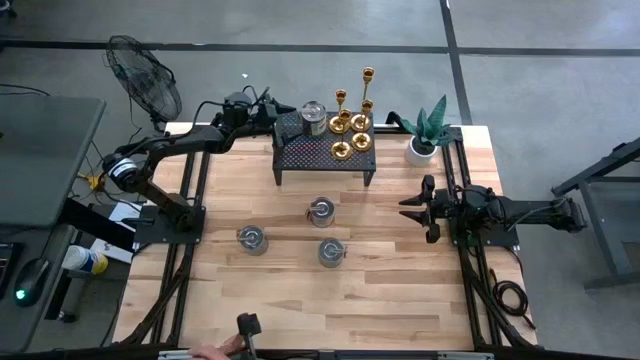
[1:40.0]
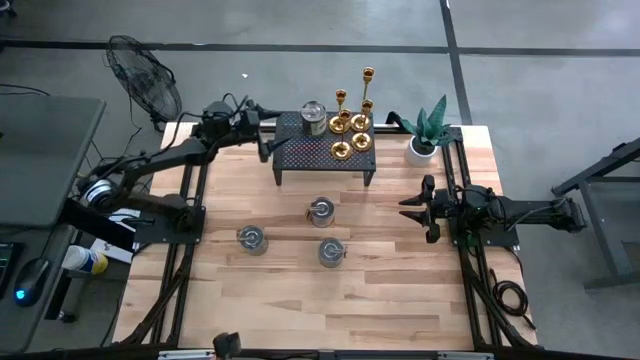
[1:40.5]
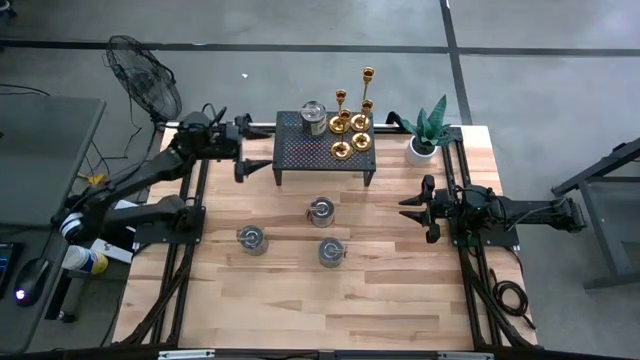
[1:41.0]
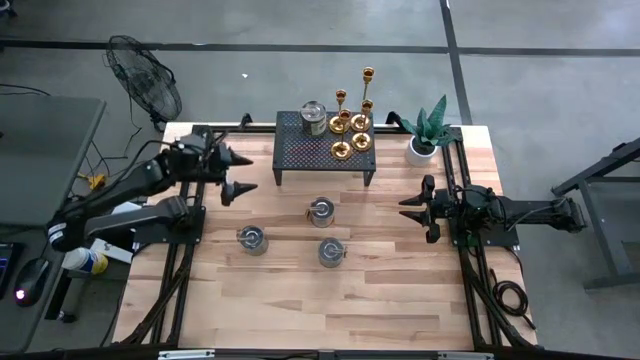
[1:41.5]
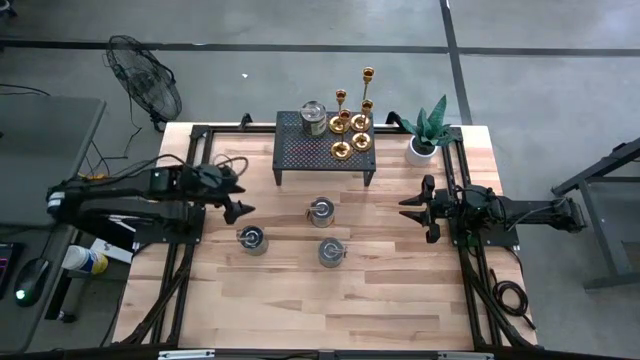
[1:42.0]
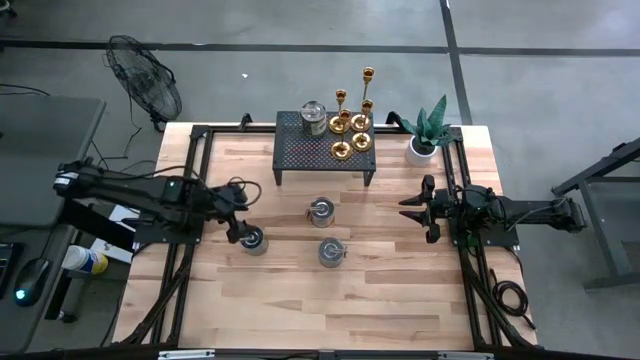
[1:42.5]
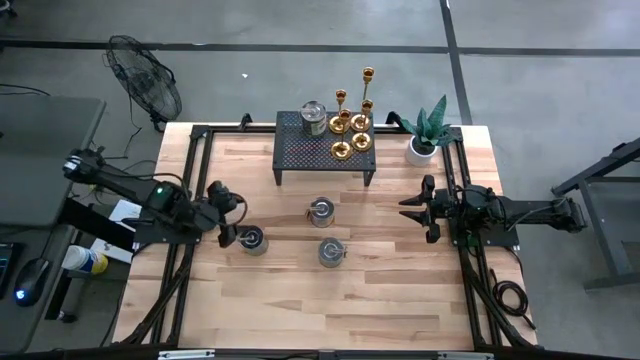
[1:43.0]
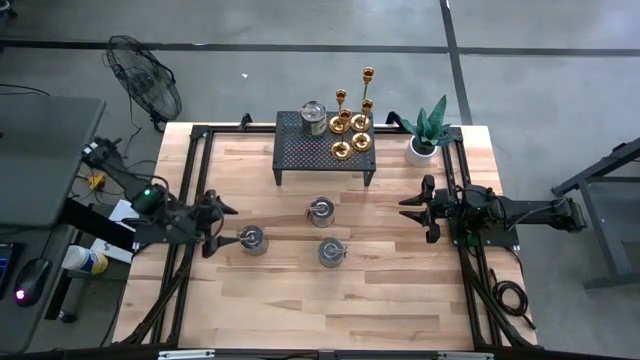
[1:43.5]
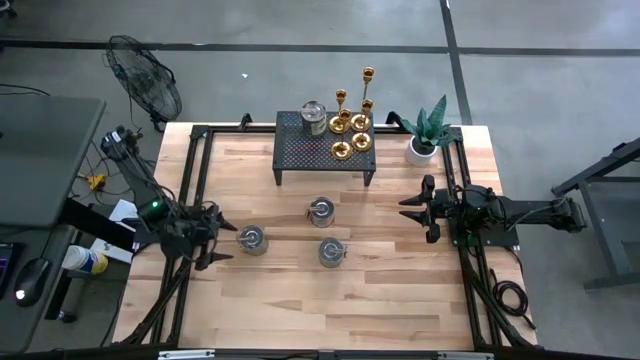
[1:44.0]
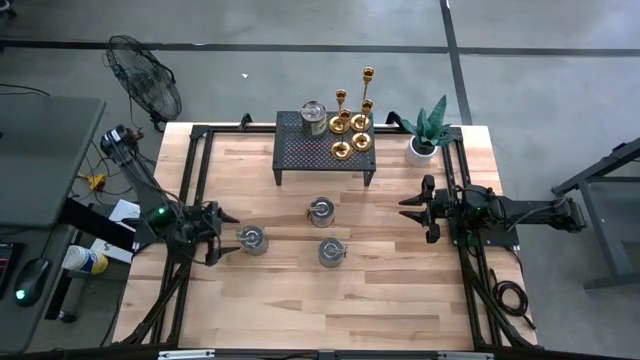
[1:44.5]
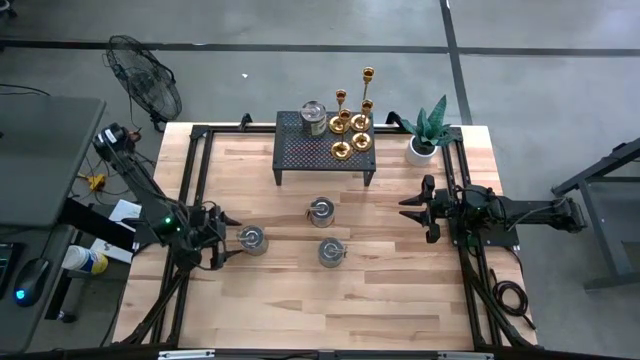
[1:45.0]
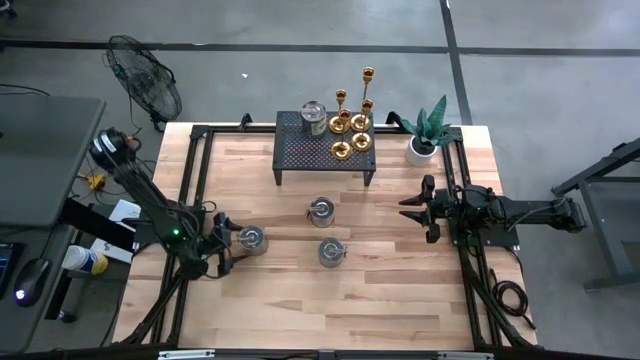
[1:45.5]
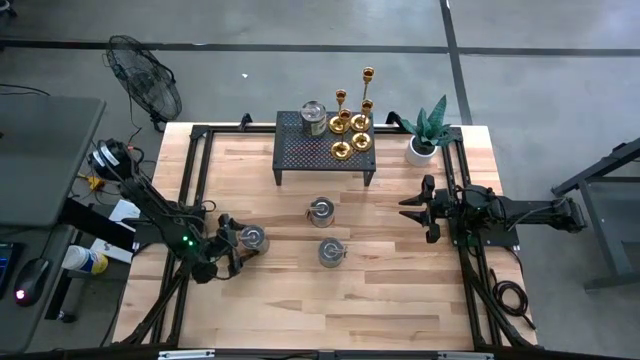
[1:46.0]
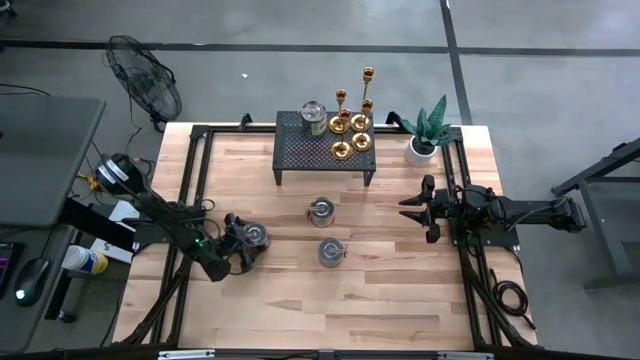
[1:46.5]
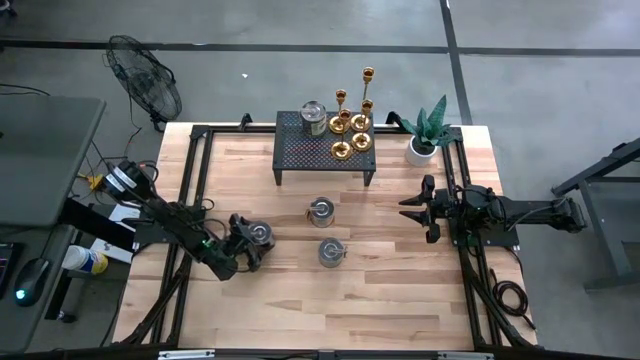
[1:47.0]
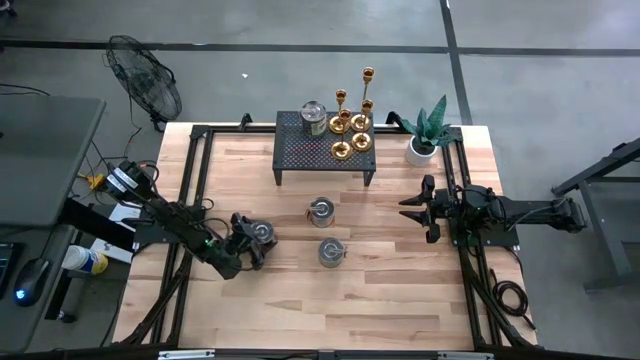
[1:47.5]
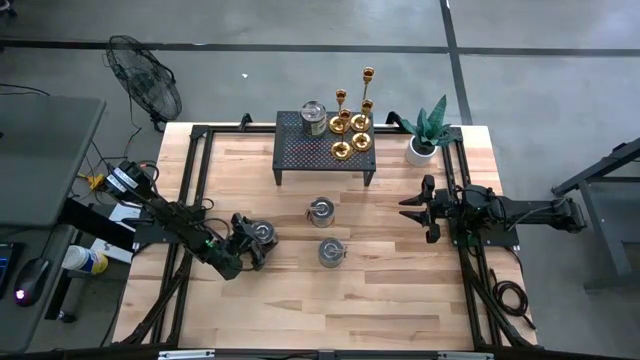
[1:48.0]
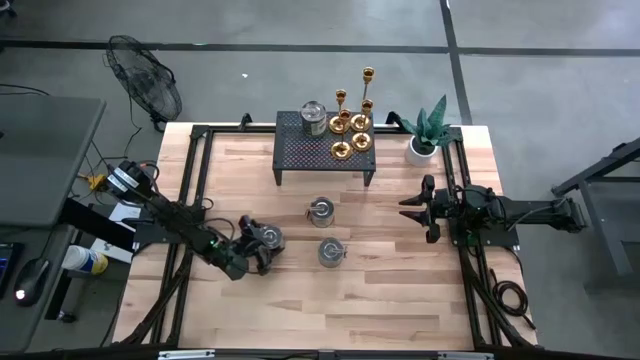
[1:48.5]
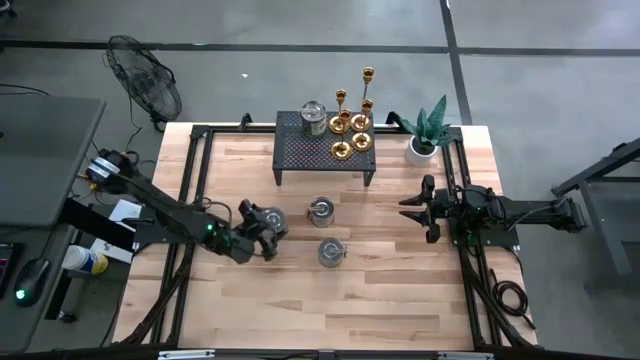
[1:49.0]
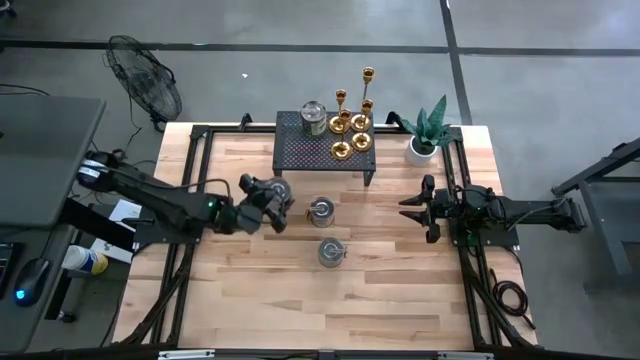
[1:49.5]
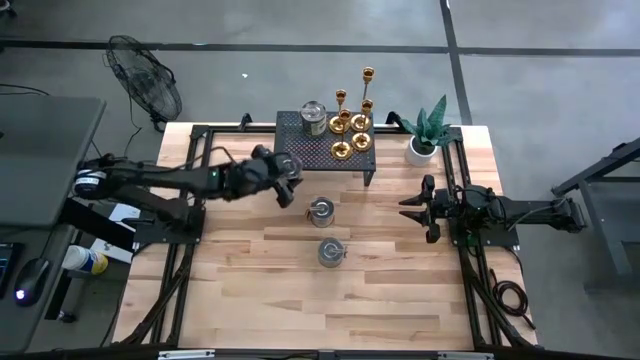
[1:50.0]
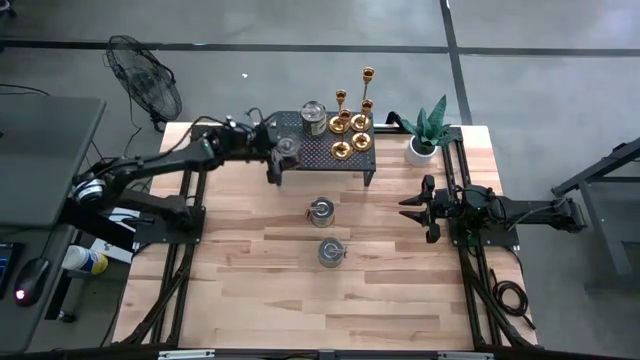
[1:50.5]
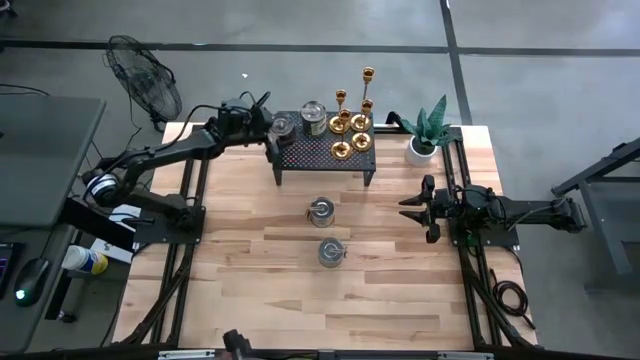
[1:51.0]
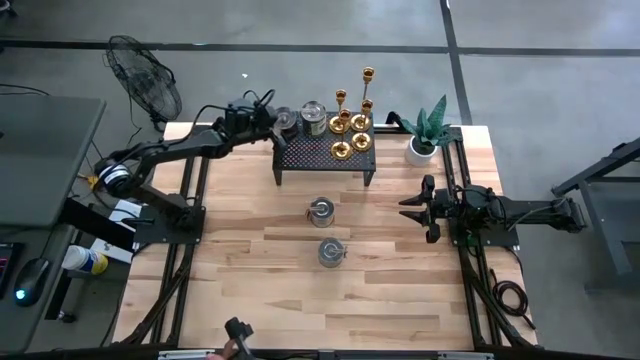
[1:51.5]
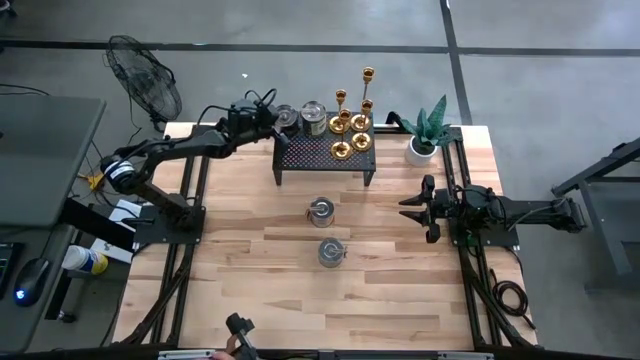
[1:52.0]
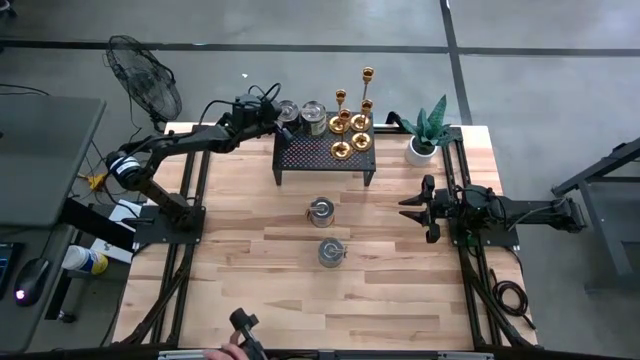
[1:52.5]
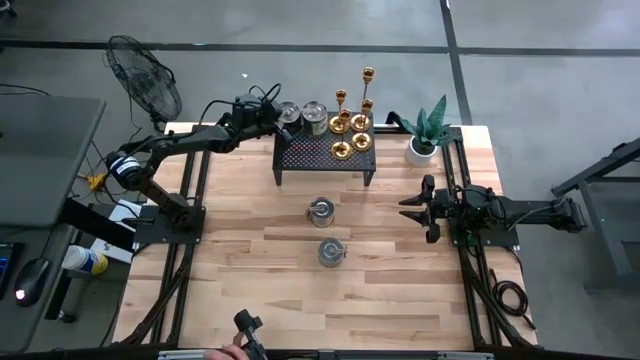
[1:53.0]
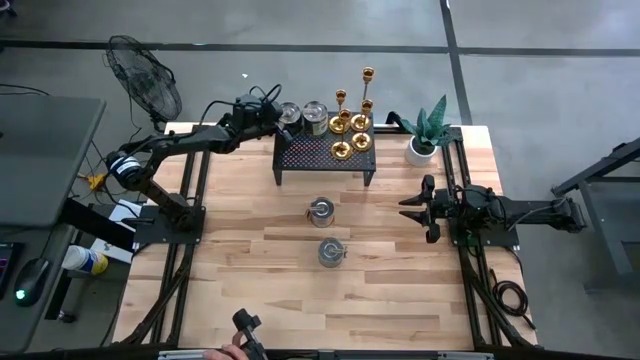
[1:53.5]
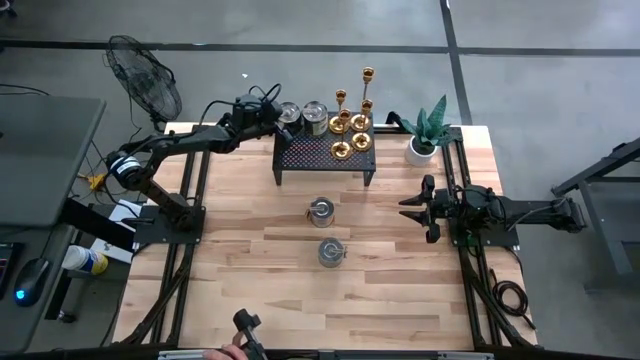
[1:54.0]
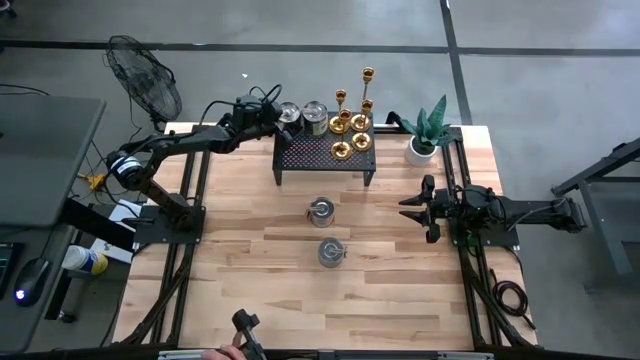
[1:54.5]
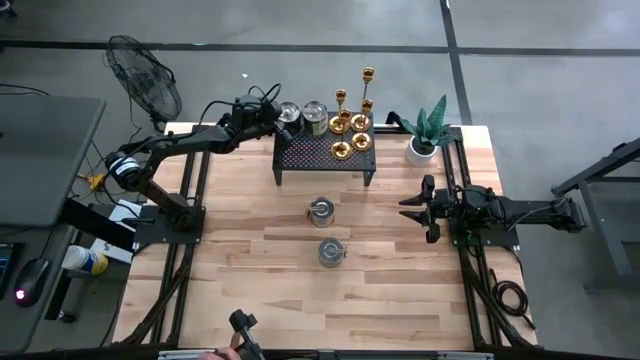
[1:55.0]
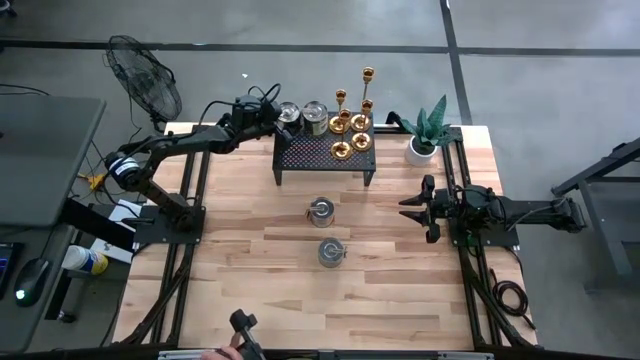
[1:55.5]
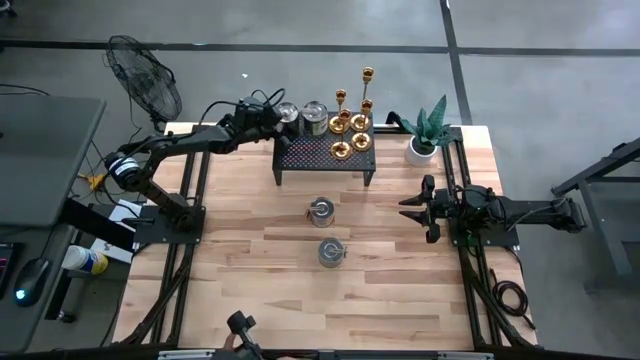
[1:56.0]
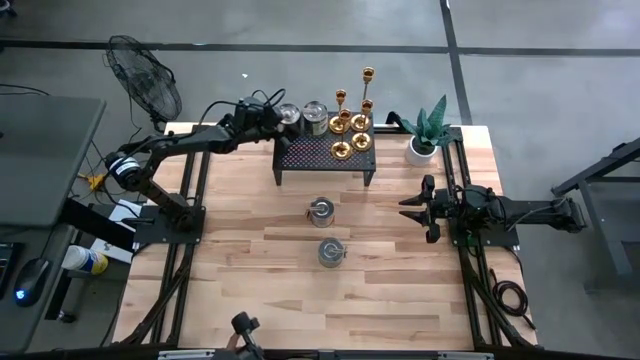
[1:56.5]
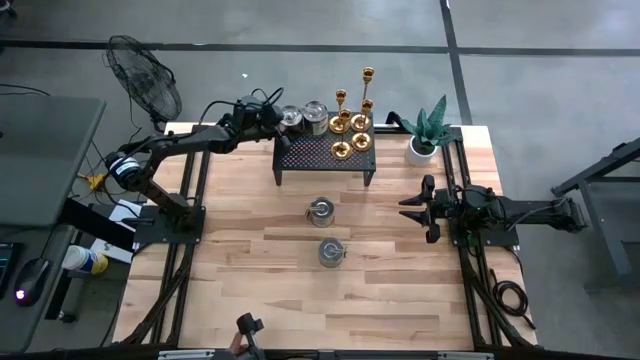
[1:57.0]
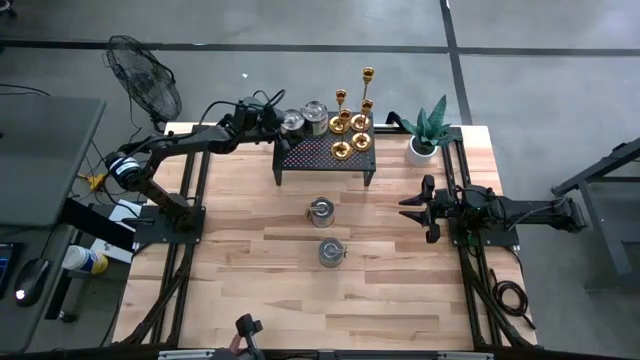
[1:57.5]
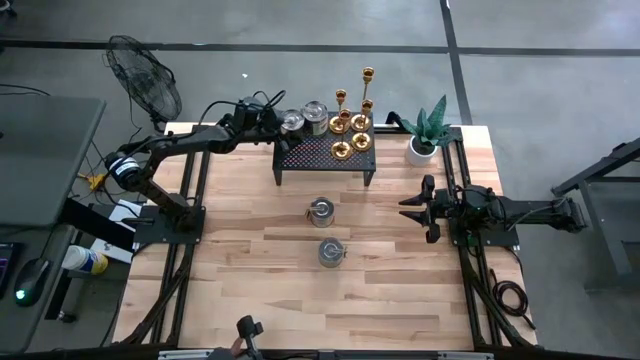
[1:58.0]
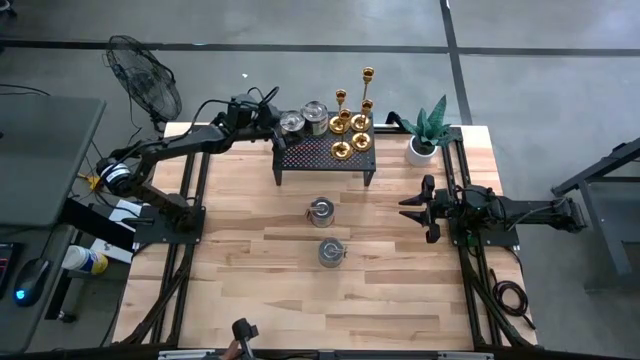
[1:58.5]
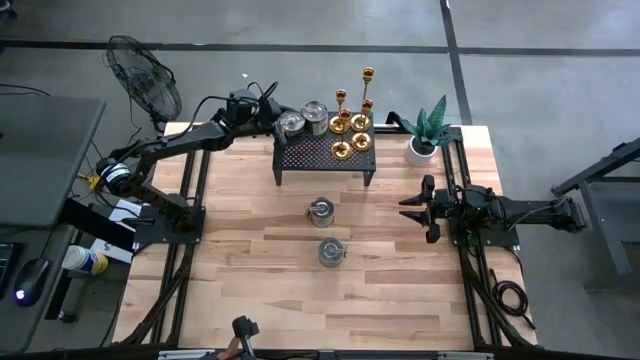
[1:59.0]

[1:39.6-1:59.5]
Task: Pick & Place candle stick holders
Put the scented candle on the shelf
